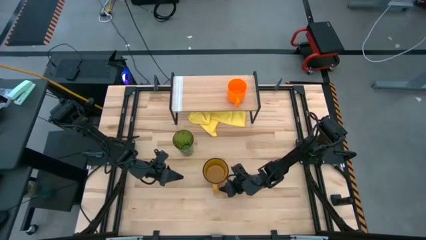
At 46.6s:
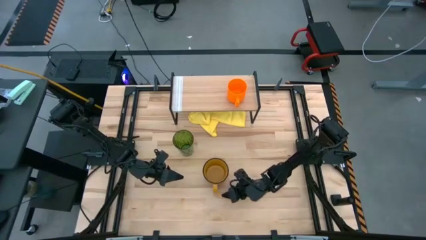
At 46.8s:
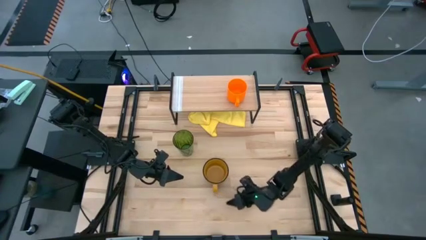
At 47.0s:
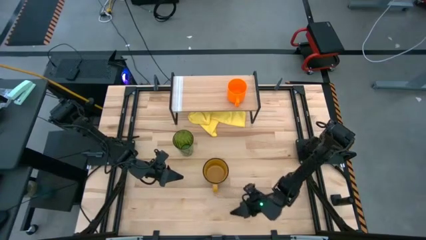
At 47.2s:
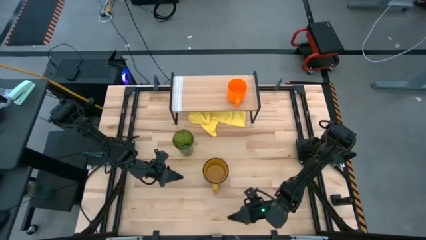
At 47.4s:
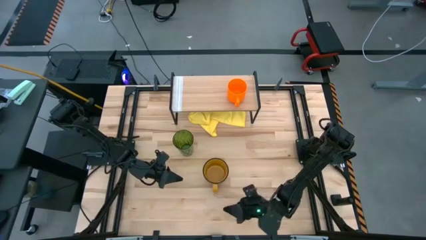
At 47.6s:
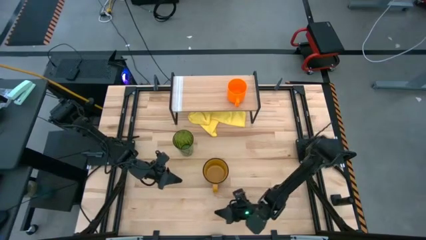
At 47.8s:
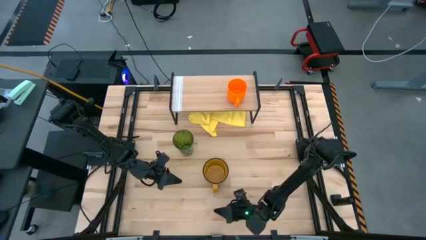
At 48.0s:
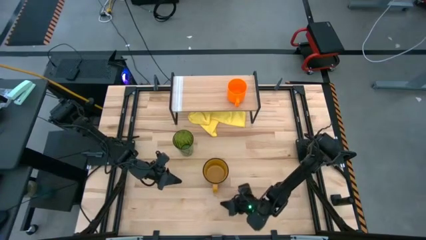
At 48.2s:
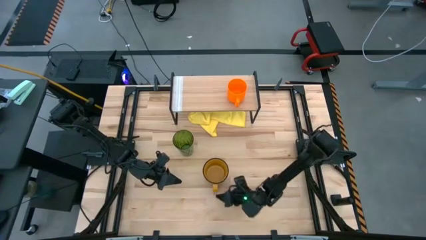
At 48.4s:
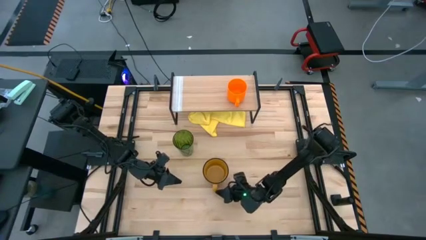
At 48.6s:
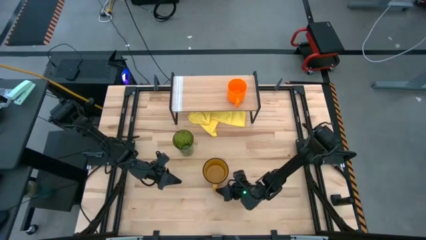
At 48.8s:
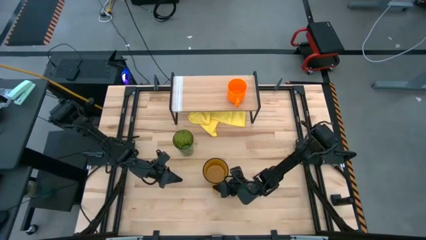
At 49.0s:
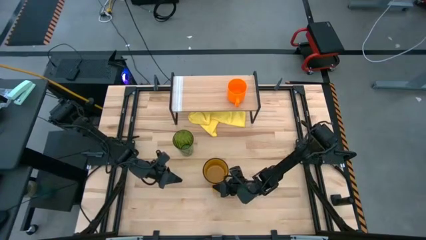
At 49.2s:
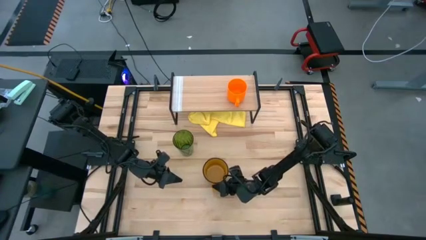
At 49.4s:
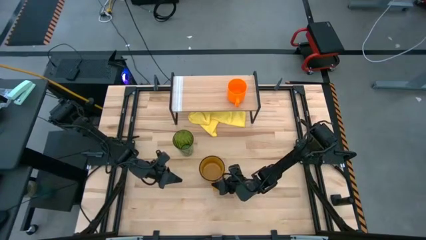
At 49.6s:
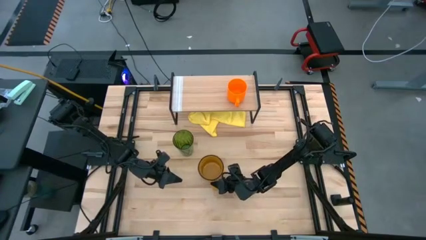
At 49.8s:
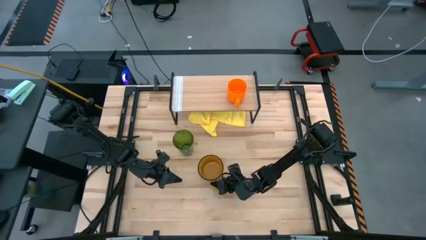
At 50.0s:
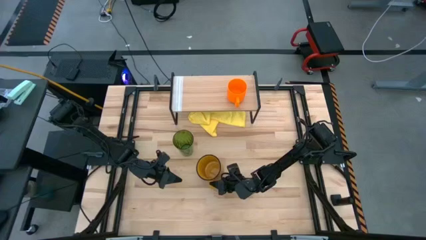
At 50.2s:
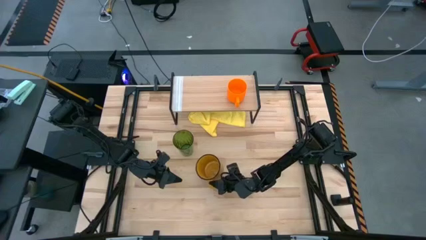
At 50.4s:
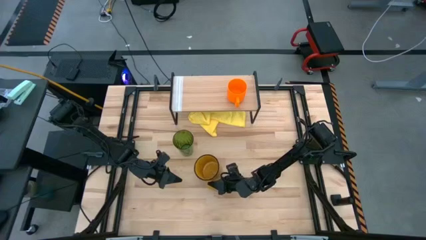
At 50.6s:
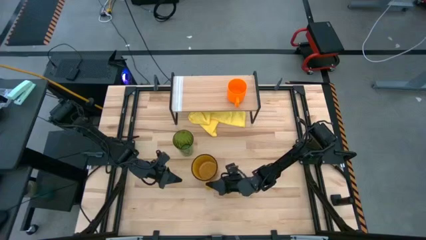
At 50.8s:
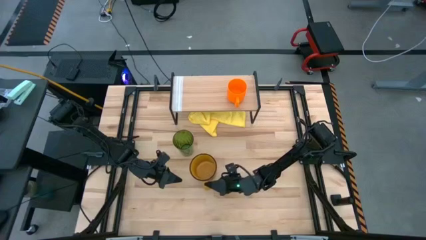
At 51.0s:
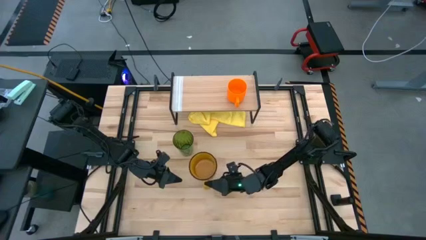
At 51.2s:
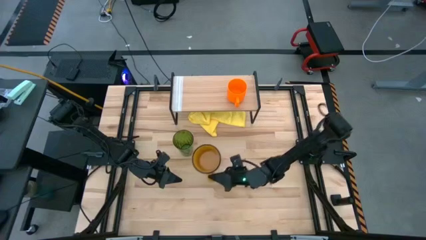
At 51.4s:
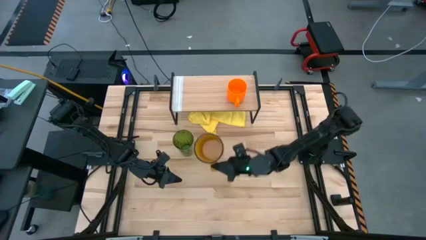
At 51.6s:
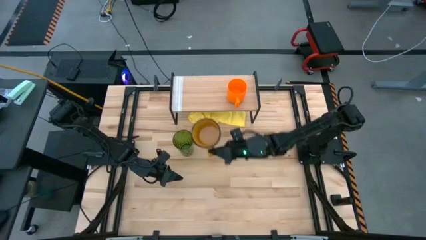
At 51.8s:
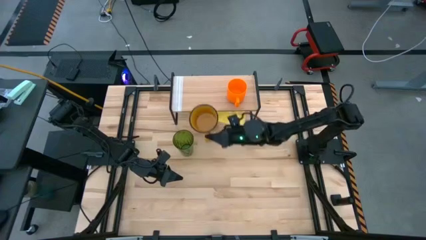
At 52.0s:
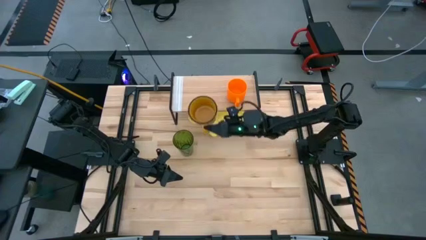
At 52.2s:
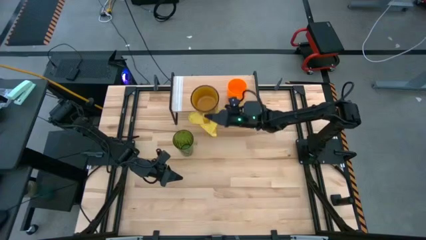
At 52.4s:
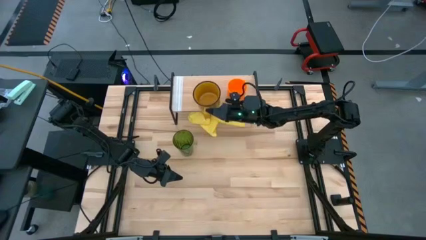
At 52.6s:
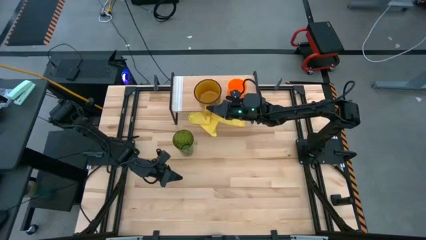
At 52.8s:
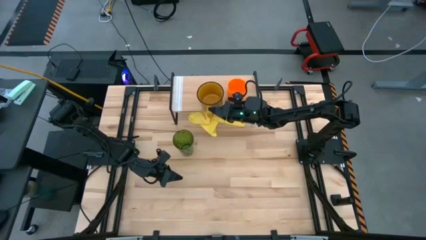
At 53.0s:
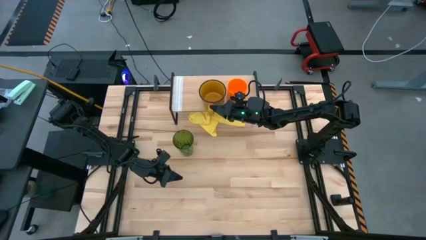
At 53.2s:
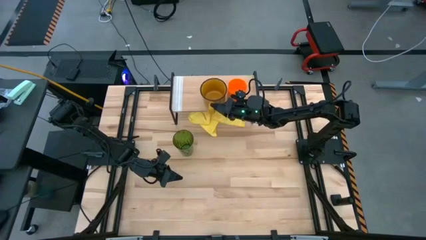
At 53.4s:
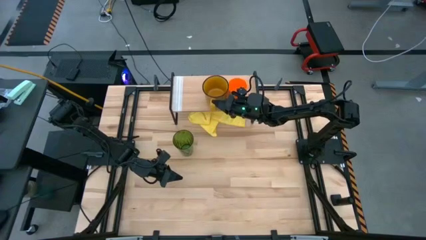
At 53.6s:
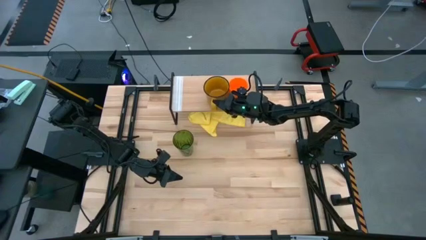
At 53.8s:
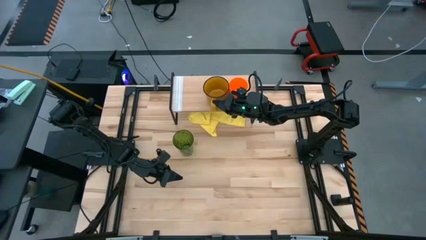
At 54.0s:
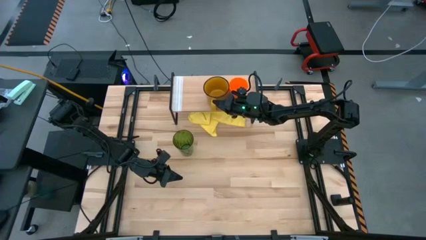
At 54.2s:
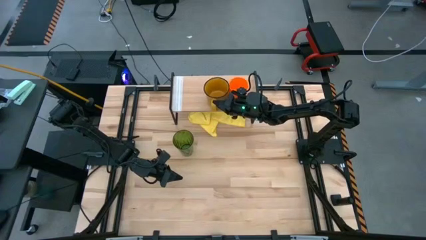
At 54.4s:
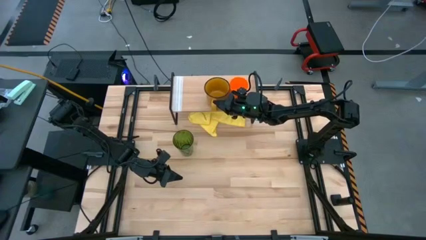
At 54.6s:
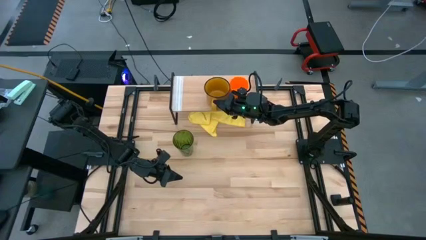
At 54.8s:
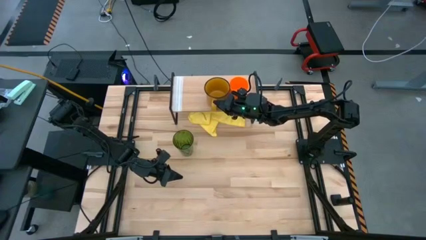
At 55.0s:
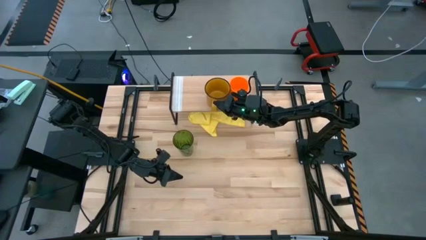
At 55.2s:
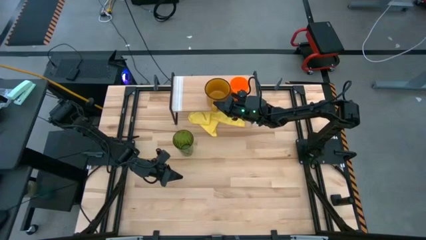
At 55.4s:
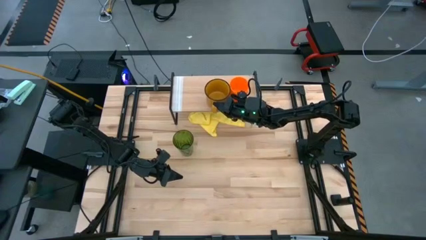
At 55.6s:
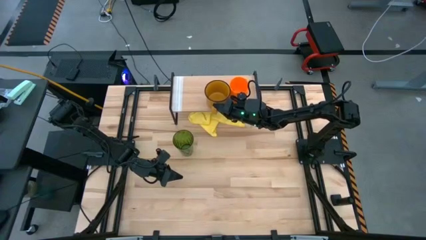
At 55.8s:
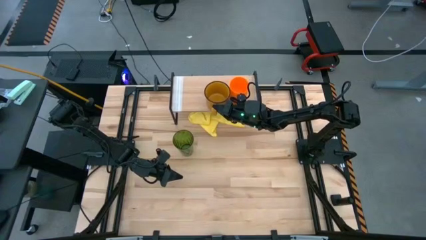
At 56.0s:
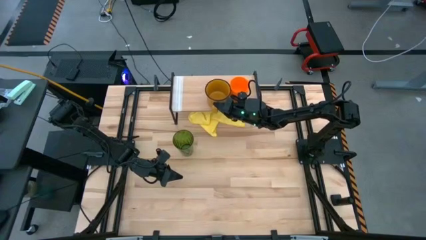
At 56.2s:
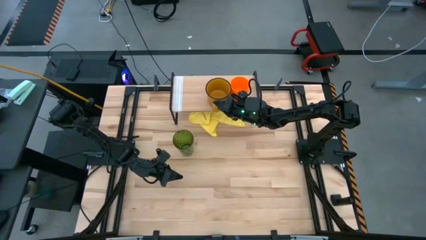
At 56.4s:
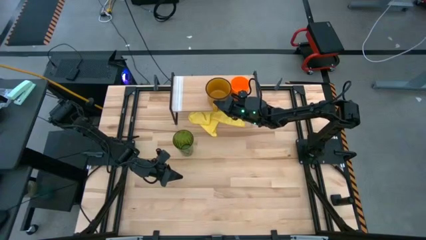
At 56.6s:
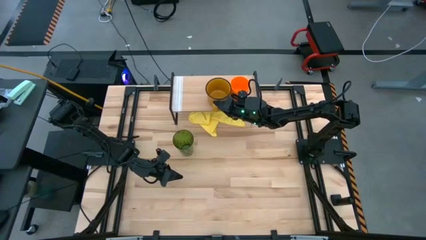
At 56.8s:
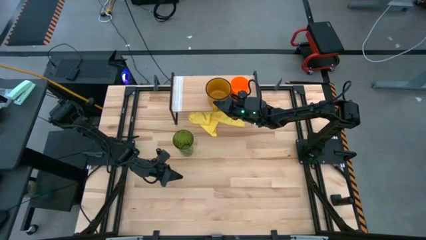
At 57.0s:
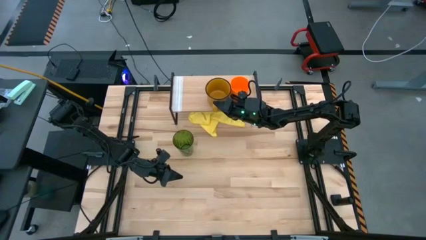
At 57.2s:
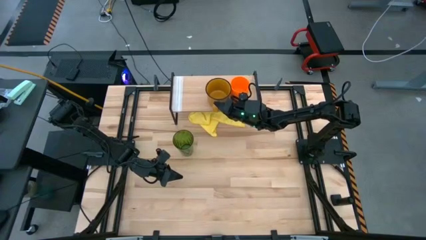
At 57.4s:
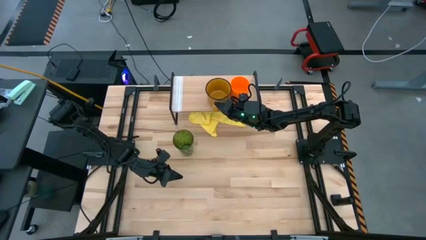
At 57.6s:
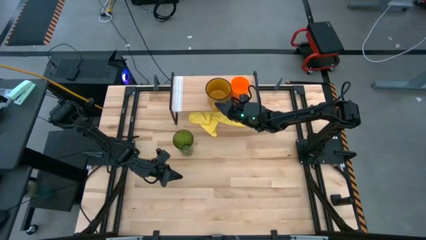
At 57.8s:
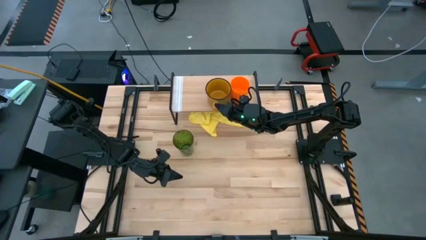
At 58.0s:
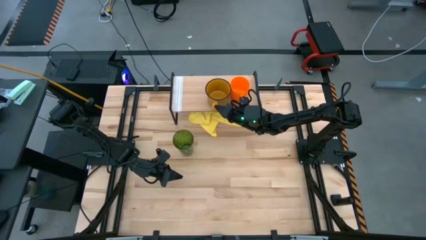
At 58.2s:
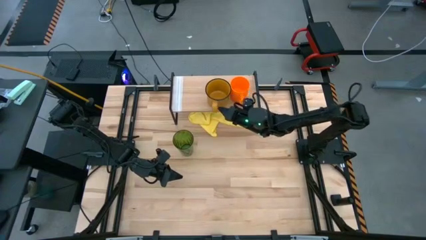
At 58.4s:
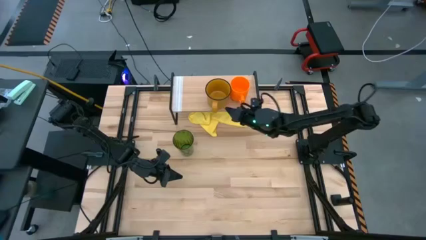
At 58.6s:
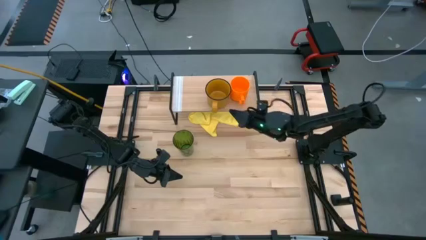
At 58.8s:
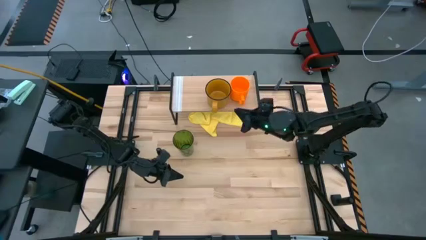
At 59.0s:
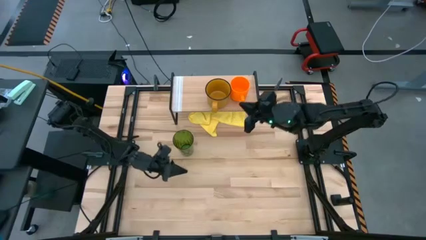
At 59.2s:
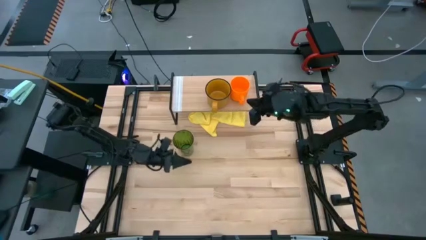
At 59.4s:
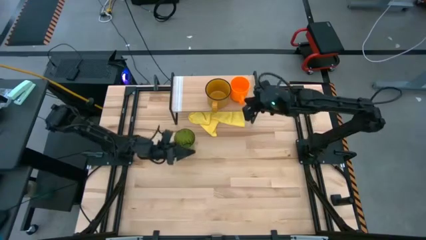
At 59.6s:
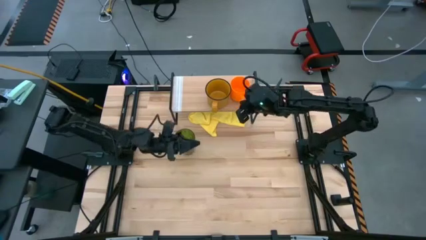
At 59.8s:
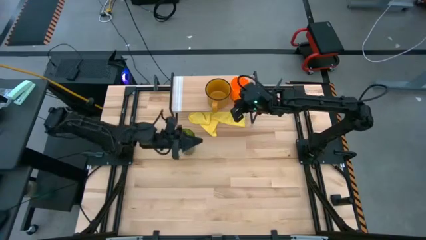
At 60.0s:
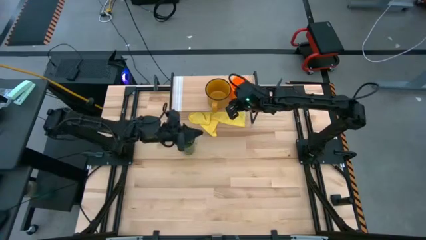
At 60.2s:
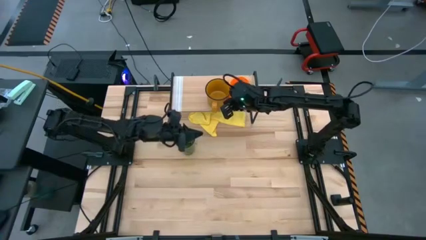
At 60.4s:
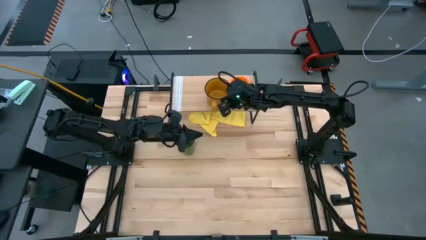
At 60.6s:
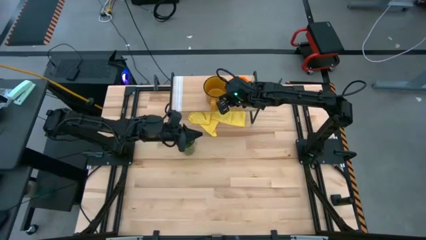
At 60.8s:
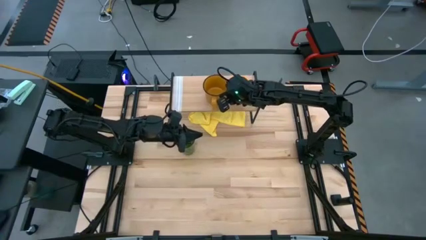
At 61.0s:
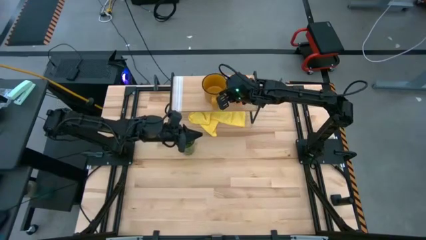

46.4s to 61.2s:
Task: Stack small to large cups/mugs on shelf
Put the yellow mug on the shelf
